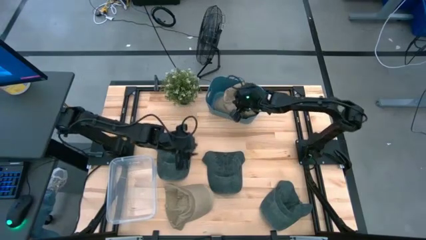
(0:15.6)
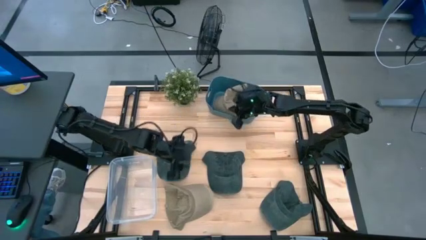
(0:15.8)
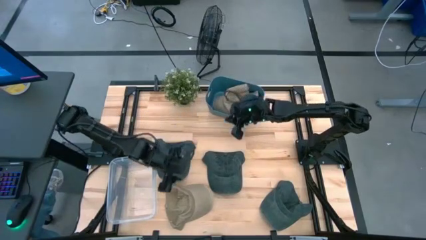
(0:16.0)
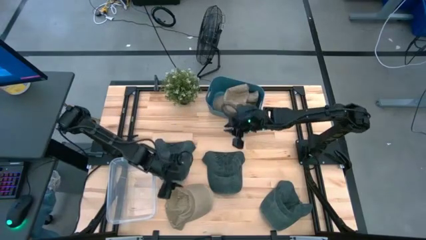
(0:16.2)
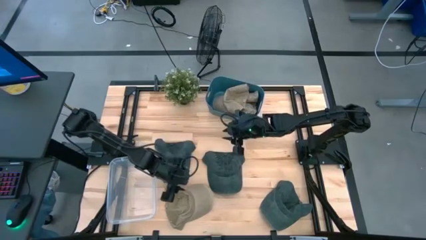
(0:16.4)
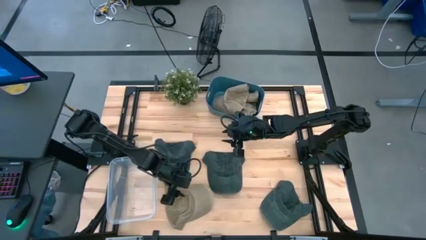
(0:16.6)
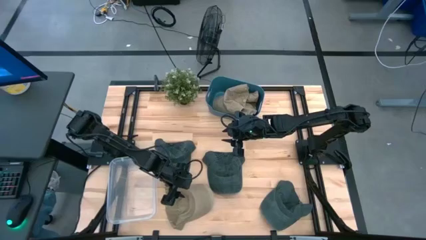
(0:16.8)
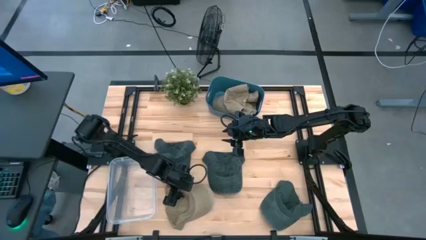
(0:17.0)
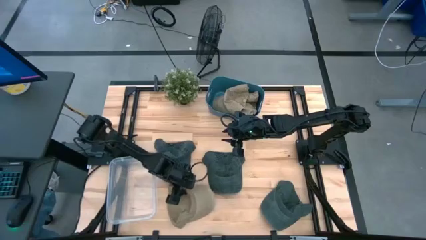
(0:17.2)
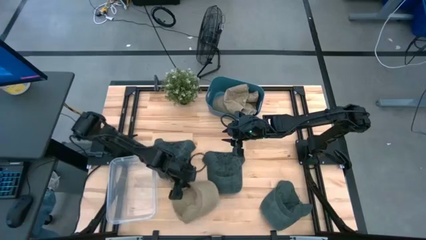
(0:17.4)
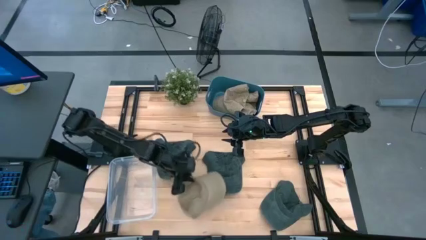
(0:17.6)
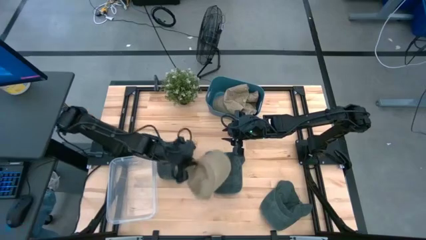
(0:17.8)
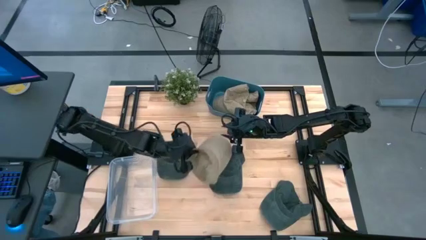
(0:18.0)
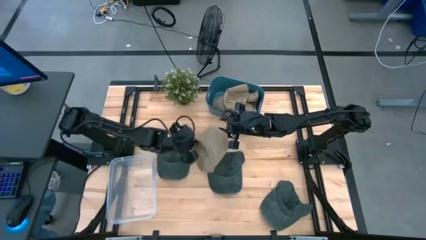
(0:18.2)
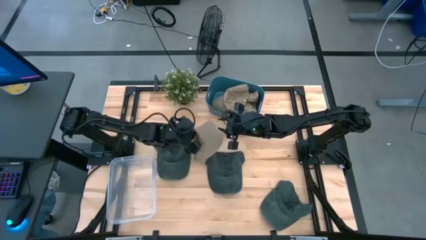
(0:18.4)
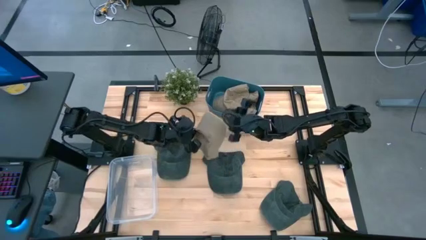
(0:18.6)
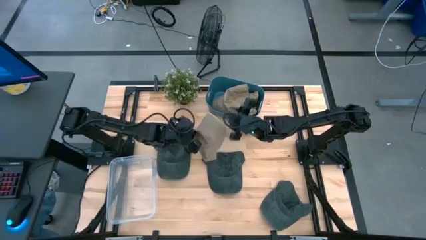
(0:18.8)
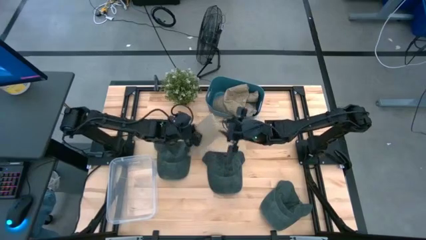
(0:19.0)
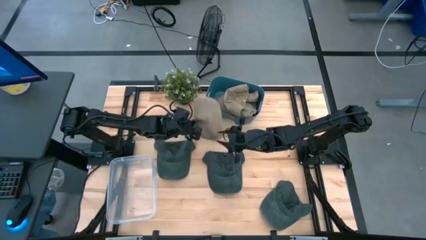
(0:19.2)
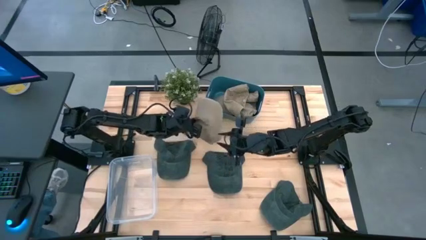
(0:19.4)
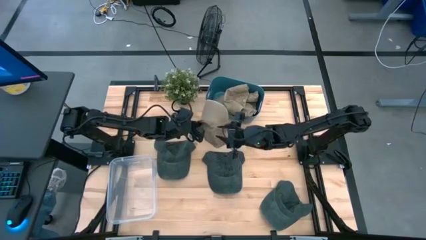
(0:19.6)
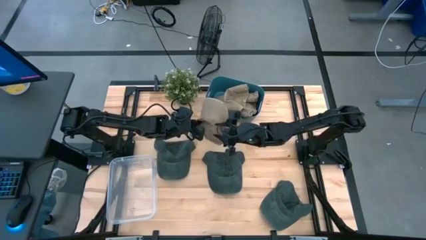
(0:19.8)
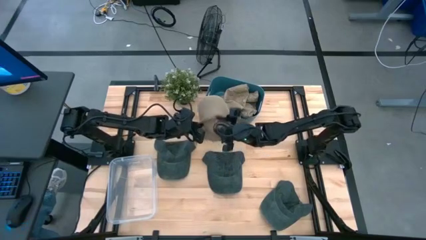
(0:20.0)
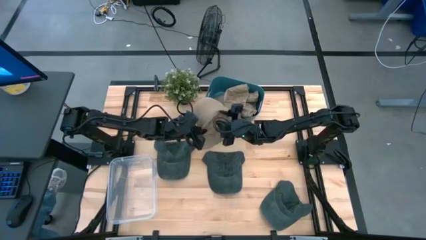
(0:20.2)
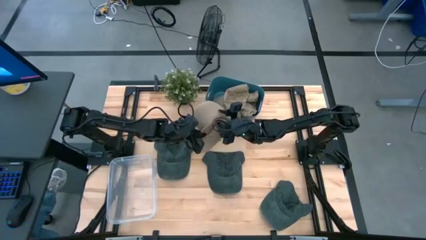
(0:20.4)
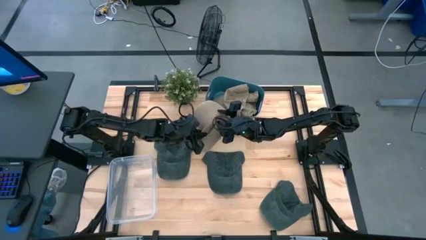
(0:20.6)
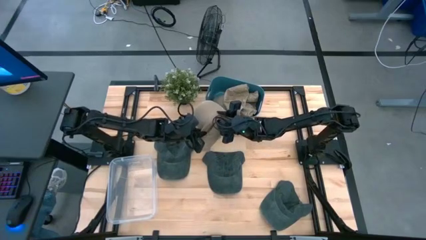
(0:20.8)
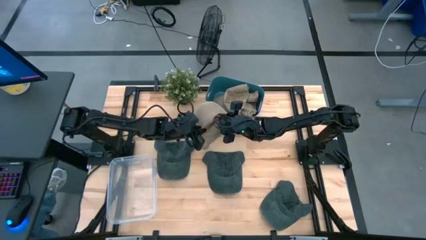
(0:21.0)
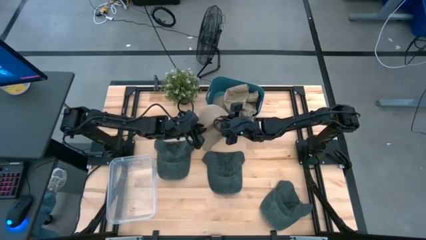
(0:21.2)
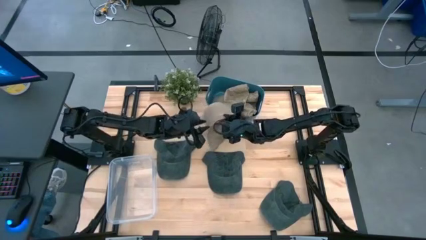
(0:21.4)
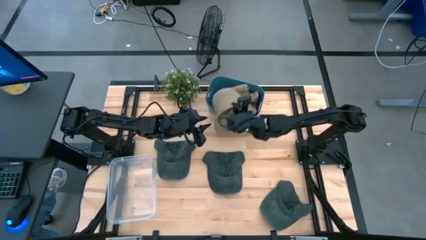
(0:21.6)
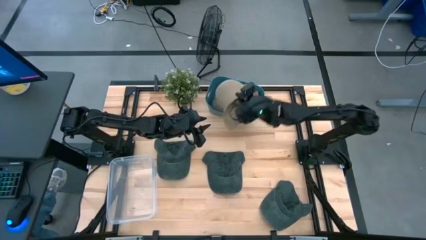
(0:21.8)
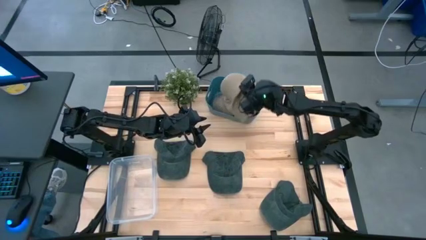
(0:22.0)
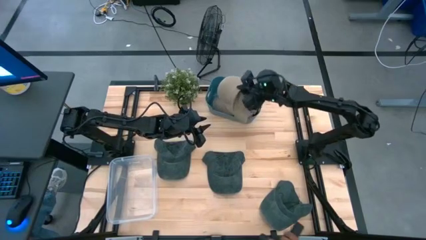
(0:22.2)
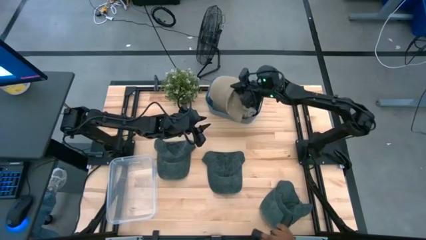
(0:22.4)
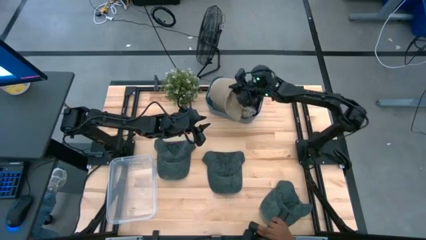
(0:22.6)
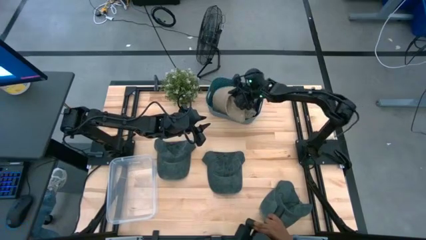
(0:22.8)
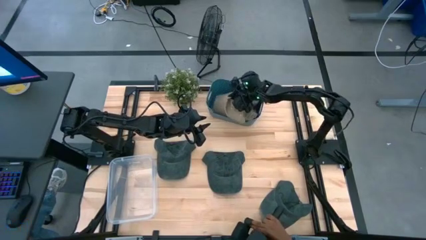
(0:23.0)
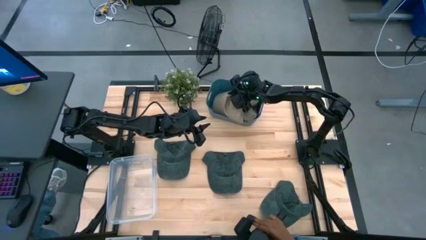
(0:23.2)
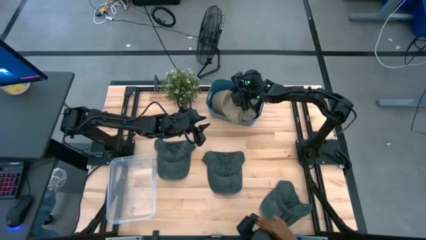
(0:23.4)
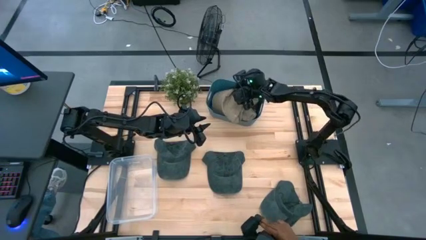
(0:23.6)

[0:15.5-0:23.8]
Task: Pick & Place hat
Put the brown cap into the blue bin

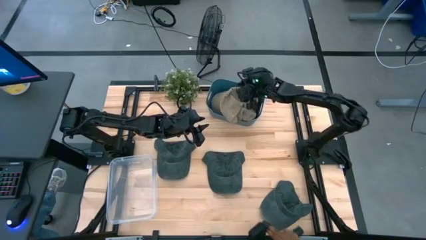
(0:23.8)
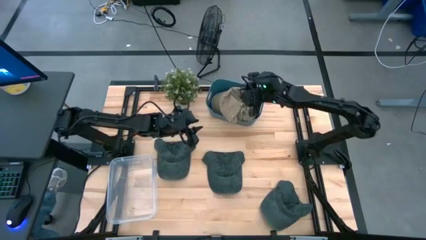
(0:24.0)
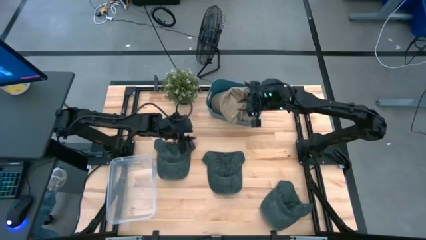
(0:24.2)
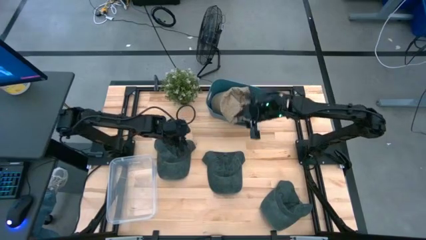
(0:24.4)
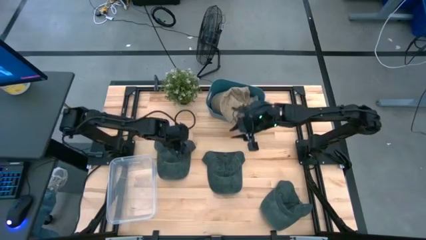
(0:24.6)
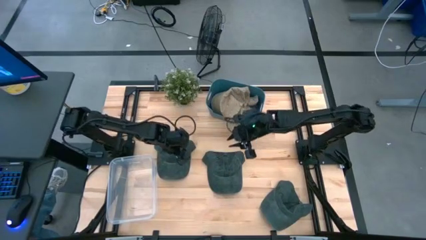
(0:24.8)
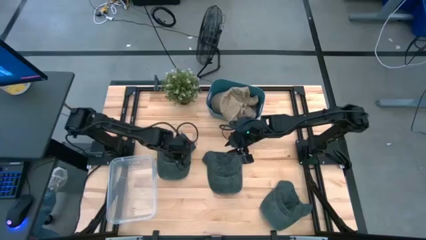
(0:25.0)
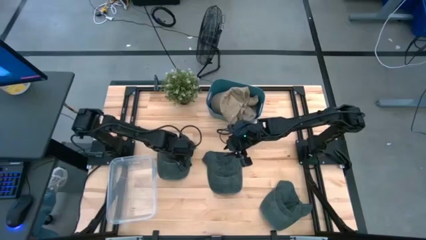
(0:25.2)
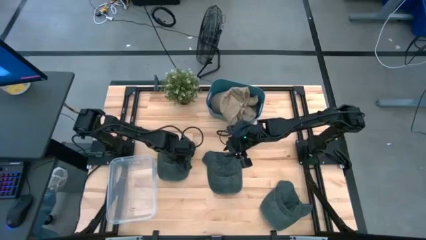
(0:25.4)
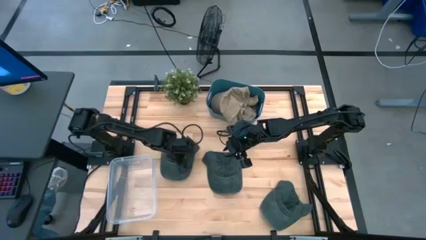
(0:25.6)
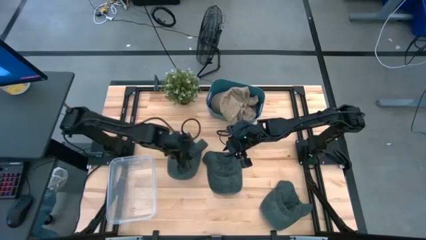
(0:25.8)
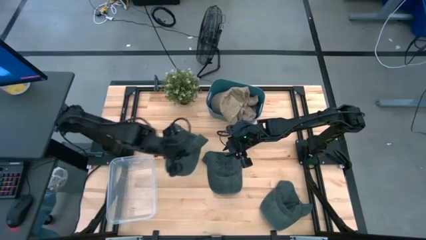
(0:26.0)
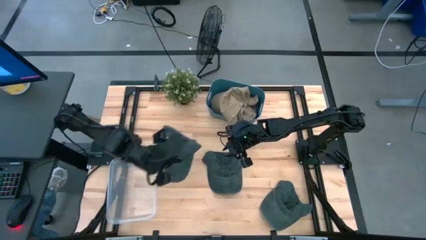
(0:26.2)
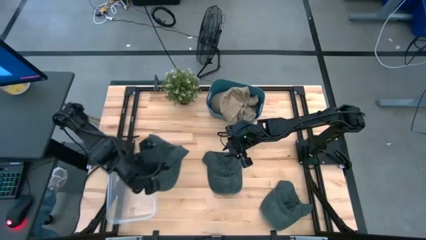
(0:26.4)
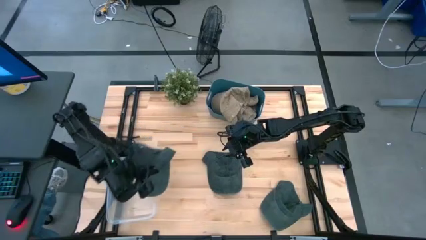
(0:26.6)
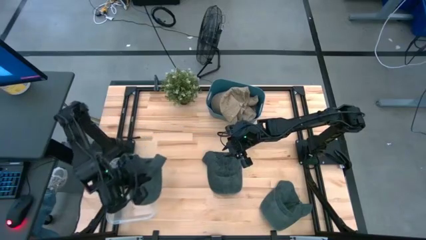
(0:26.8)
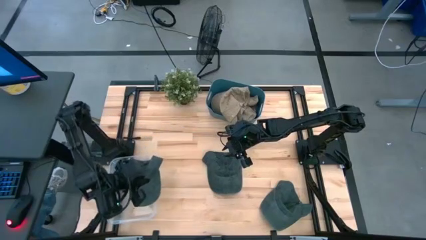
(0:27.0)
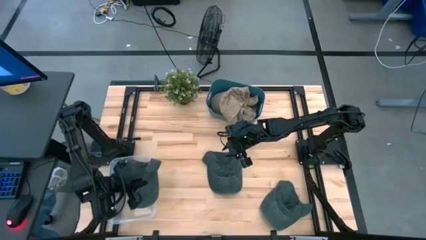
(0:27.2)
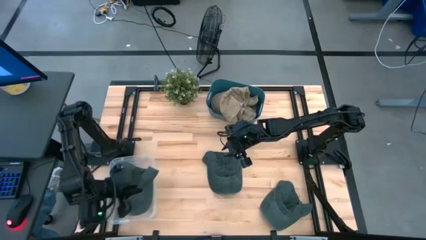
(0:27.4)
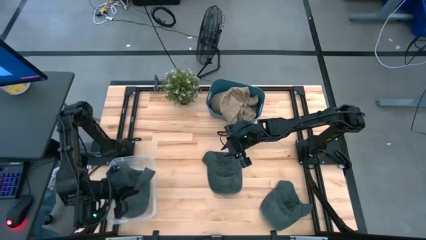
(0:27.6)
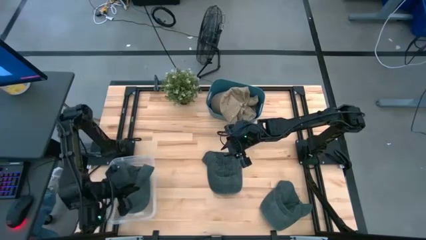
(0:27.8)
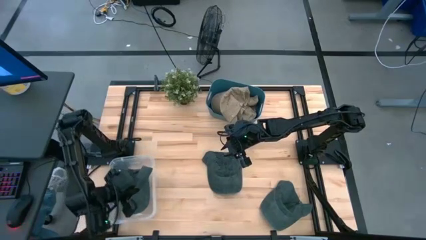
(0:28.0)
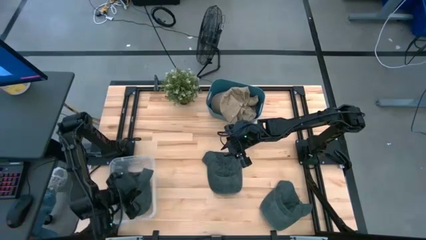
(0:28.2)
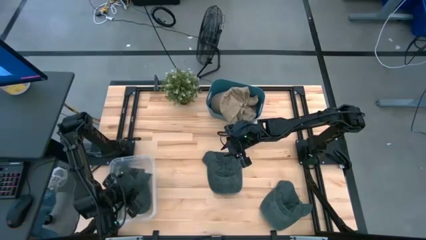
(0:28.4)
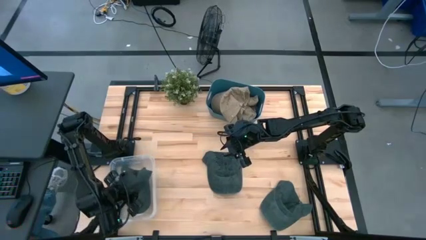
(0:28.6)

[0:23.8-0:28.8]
Put the left blue cap into the transparent bin

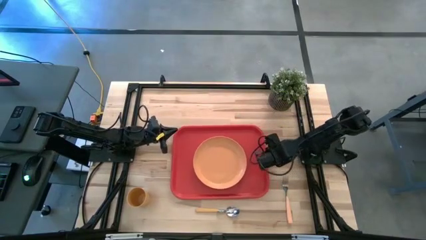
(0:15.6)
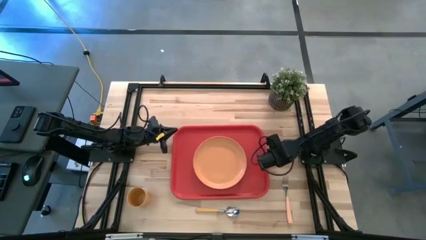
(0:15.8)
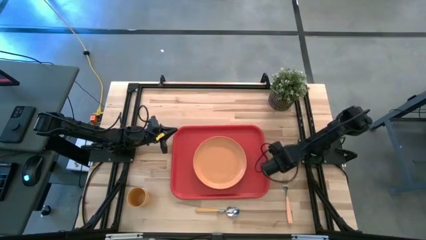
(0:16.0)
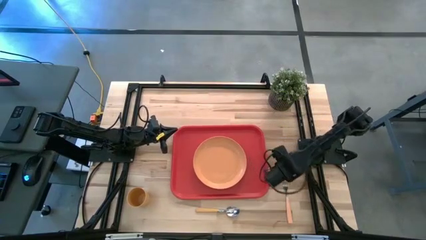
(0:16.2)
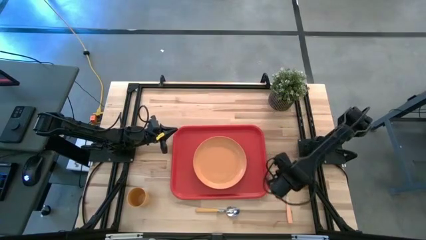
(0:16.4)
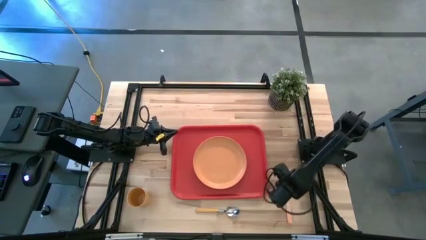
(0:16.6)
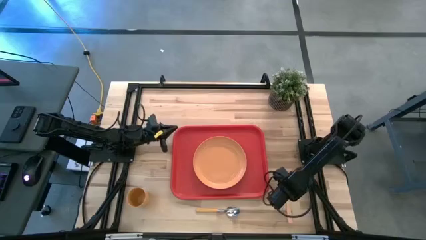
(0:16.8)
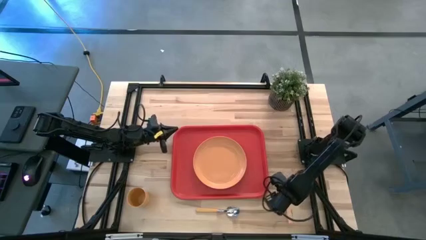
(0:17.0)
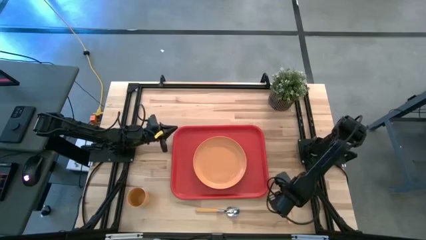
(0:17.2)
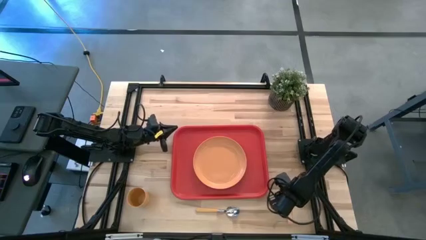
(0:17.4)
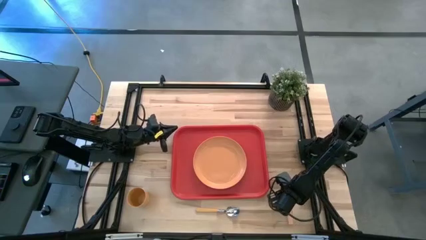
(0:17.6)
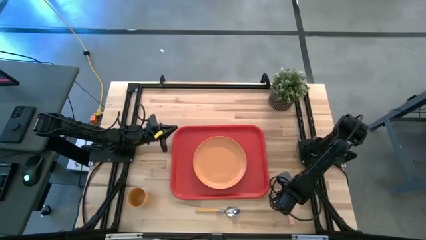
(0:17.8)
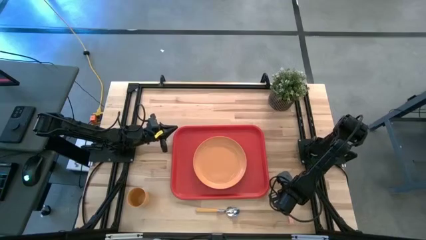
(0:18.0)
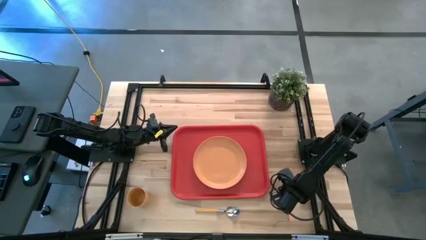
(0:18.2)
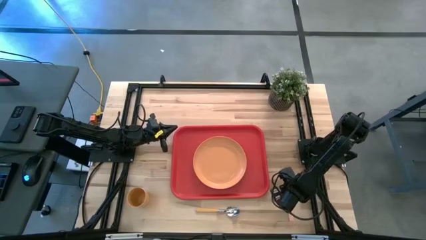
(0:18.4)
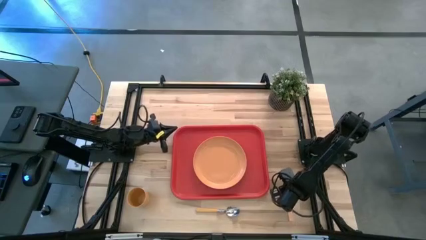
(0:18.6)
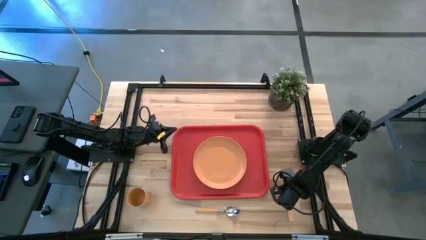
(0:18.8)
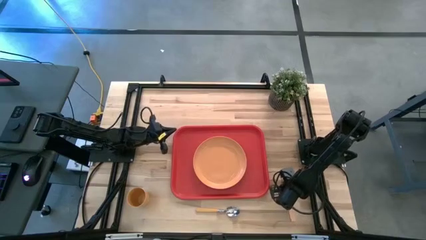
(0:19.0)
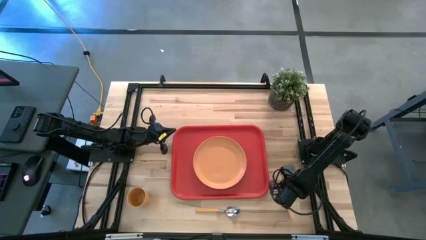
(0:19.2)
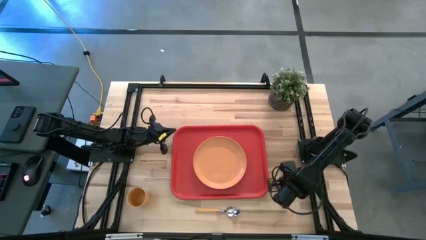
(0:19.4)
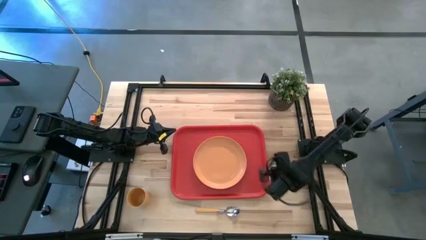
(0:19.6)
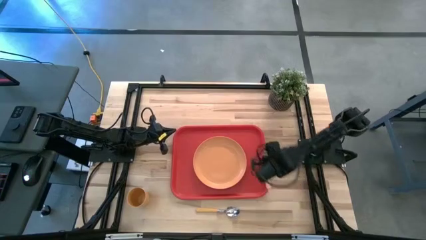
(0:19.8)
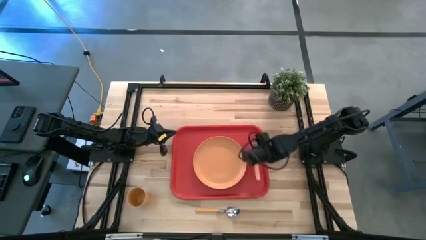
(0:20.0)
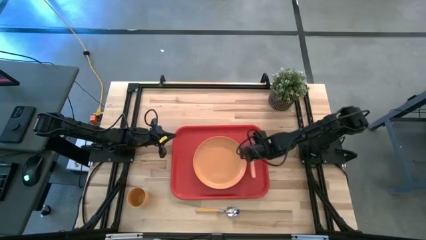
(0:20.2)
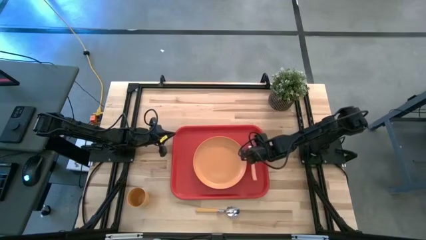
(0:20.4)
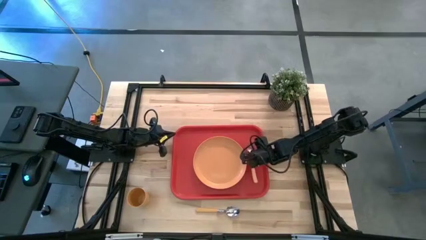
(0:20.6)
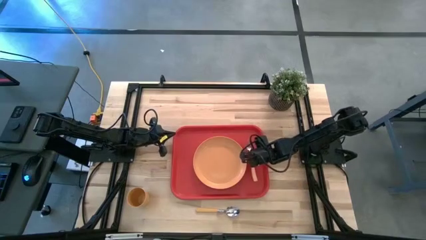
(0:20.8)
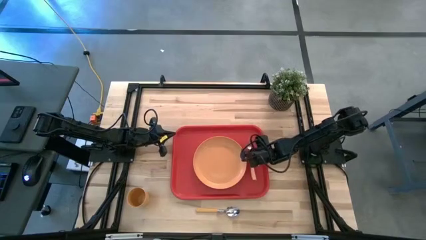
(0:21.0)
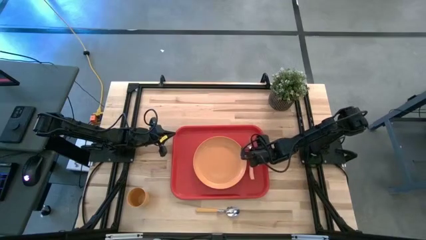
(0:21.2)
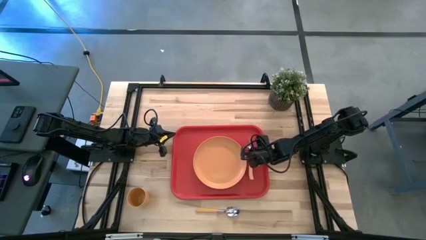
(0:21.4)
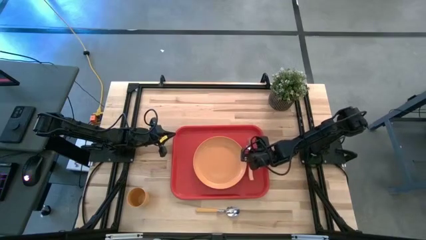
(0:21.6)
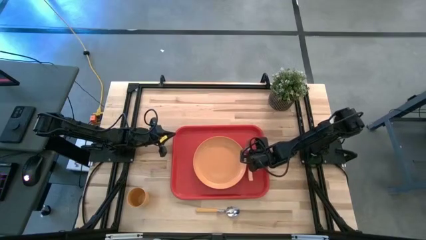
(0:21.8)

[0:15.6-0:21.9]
Task: Pick and place plate/cup/fork/spoon on tray
Put the orange fork on the red serving tray to the right of the orange plate
